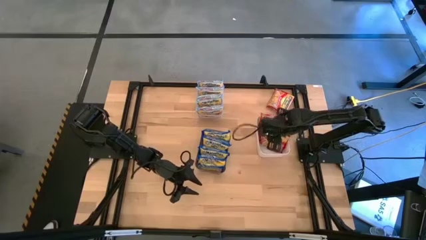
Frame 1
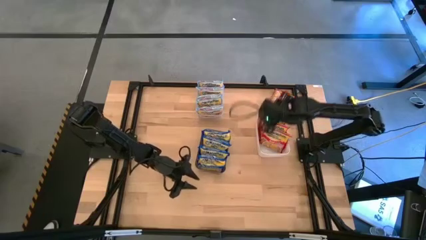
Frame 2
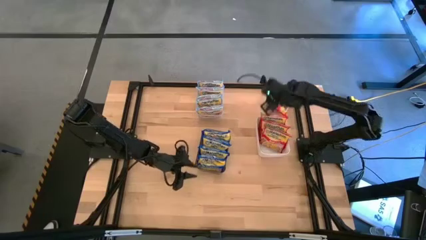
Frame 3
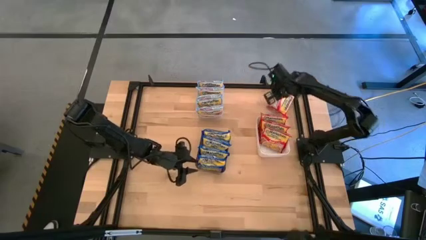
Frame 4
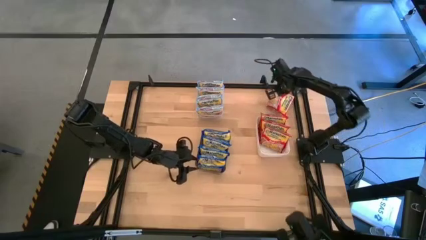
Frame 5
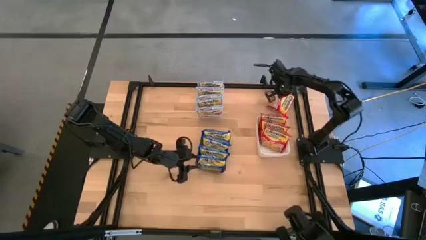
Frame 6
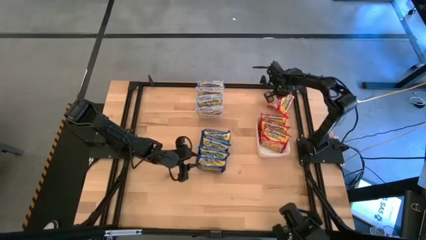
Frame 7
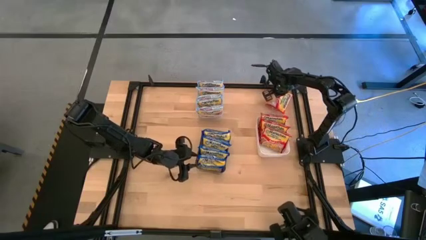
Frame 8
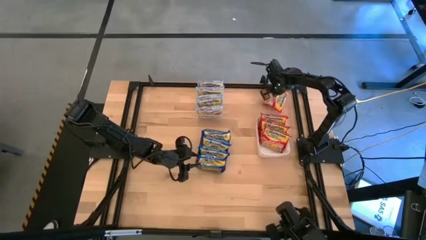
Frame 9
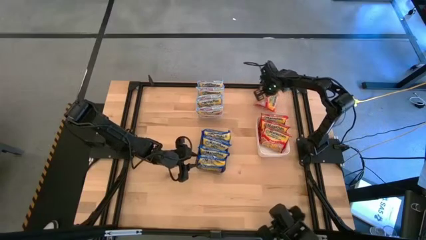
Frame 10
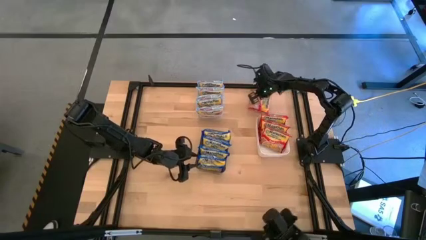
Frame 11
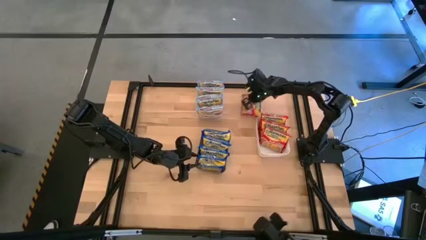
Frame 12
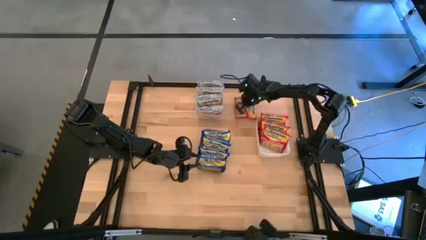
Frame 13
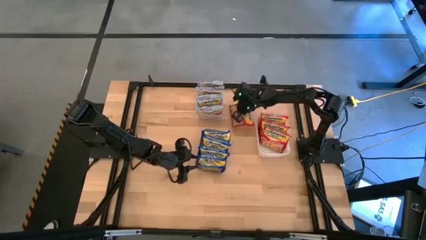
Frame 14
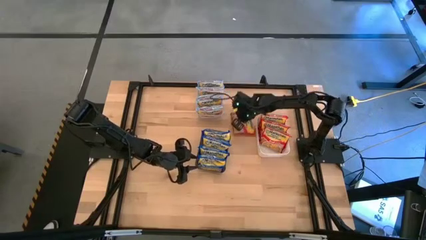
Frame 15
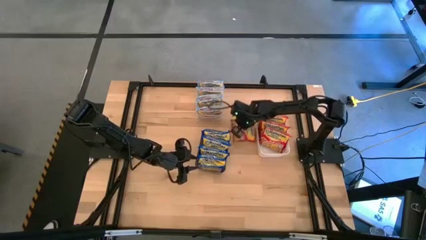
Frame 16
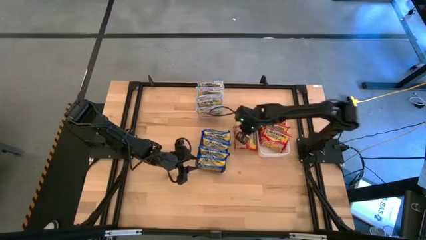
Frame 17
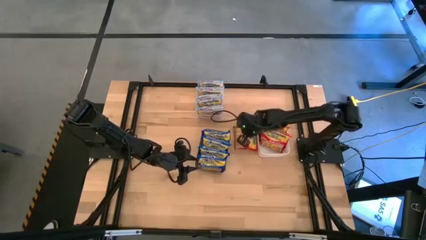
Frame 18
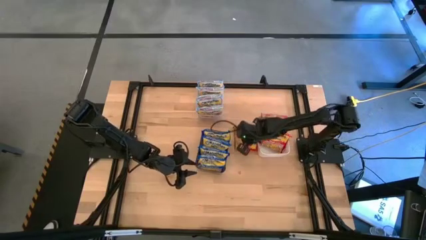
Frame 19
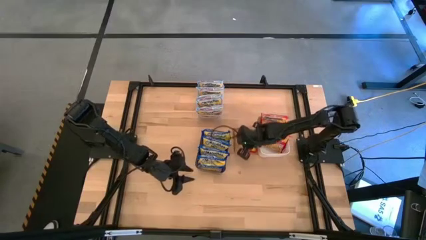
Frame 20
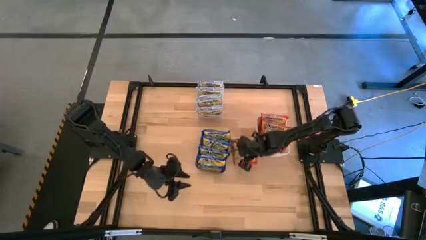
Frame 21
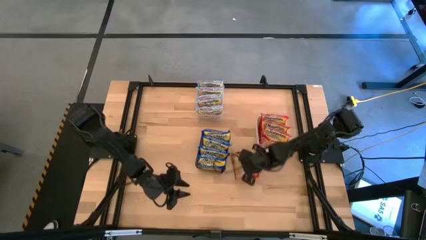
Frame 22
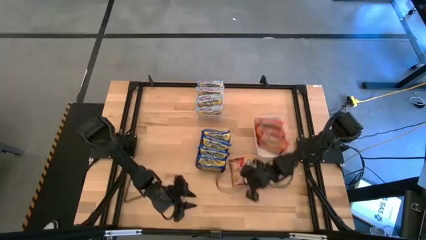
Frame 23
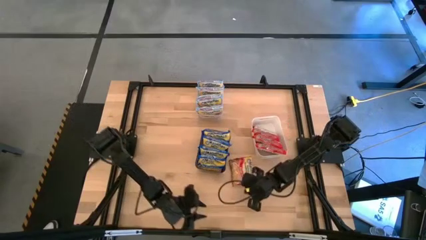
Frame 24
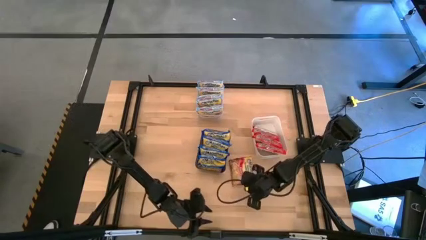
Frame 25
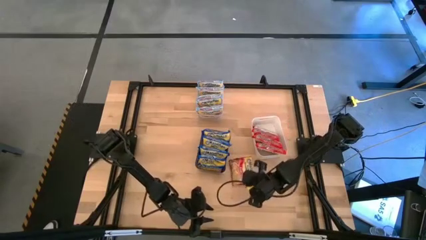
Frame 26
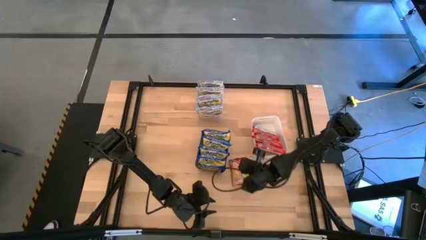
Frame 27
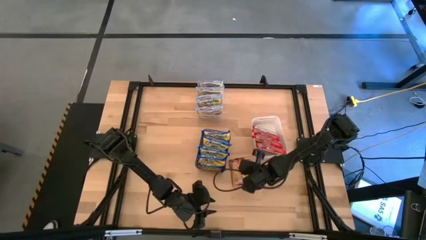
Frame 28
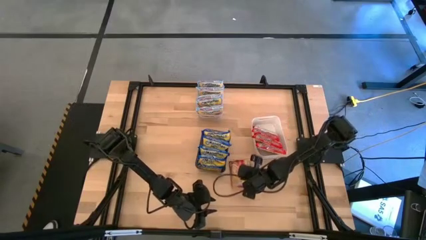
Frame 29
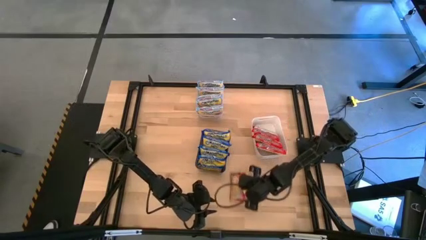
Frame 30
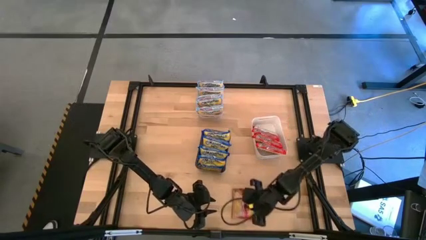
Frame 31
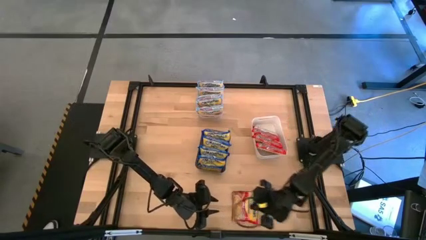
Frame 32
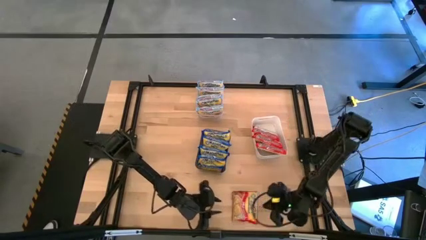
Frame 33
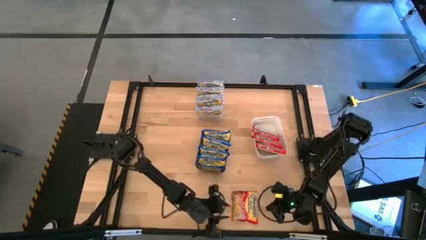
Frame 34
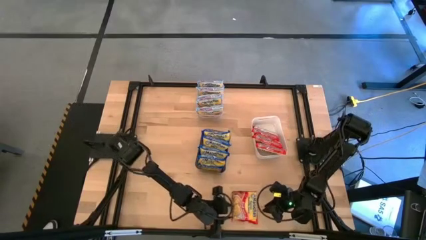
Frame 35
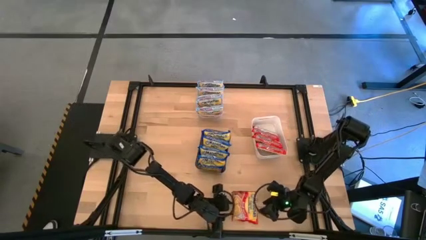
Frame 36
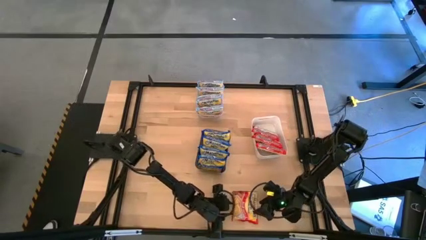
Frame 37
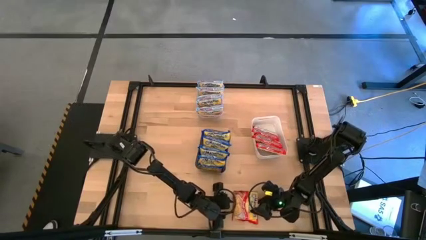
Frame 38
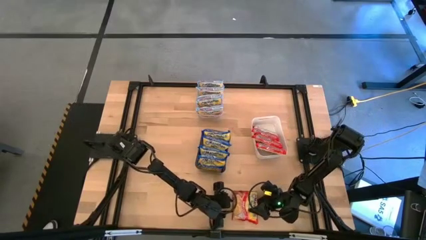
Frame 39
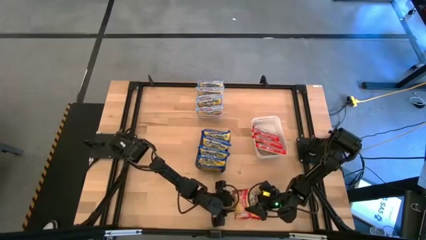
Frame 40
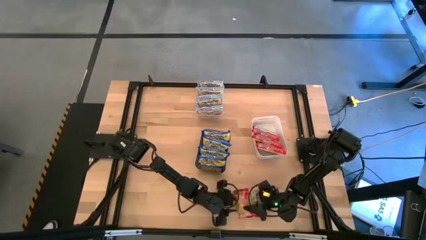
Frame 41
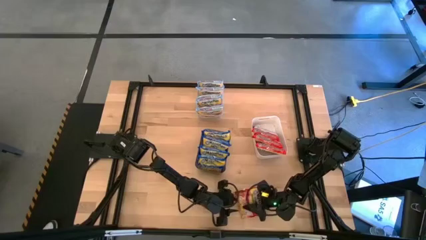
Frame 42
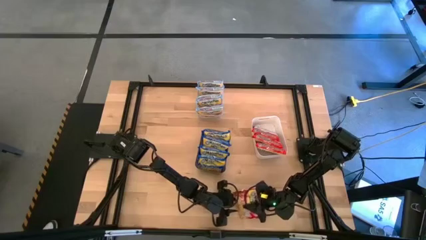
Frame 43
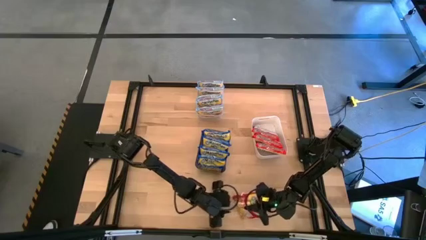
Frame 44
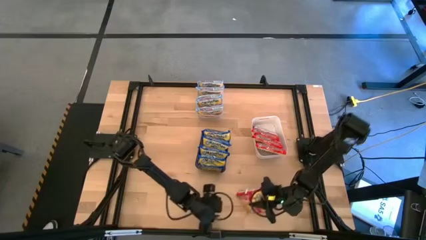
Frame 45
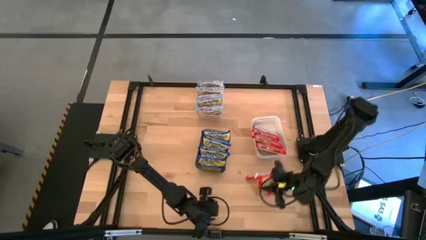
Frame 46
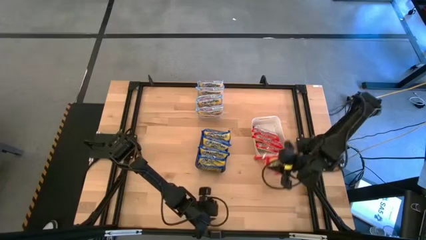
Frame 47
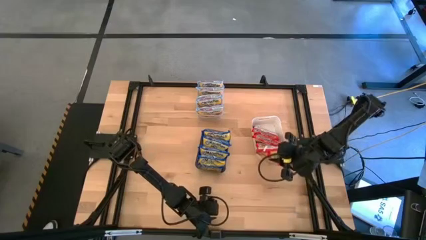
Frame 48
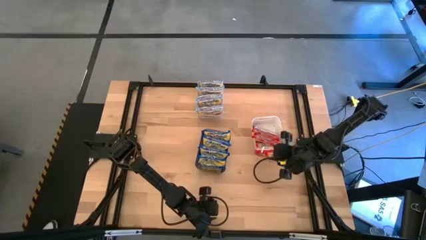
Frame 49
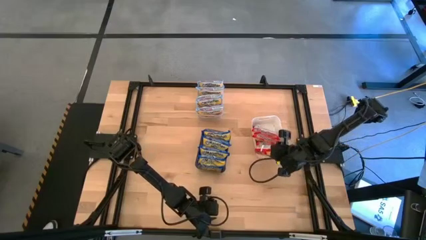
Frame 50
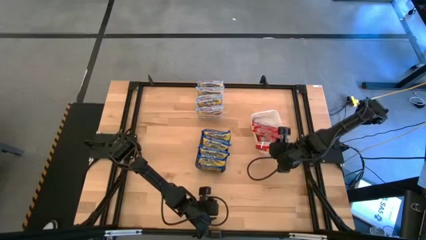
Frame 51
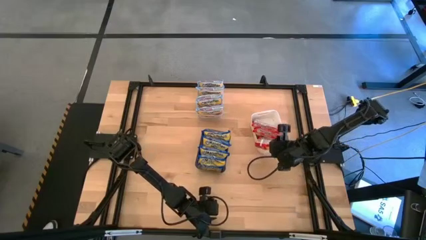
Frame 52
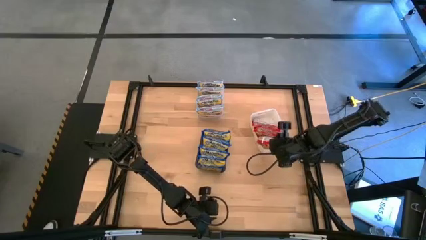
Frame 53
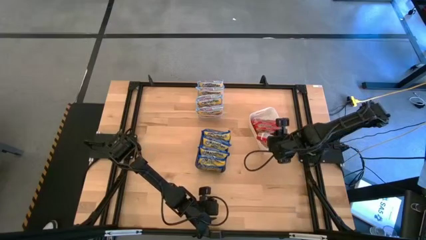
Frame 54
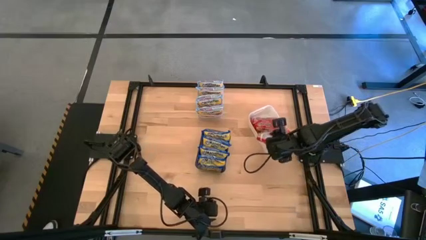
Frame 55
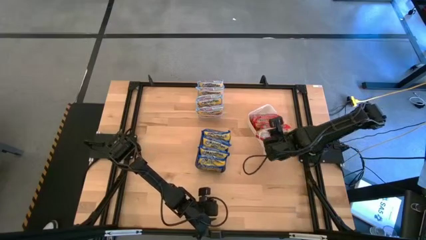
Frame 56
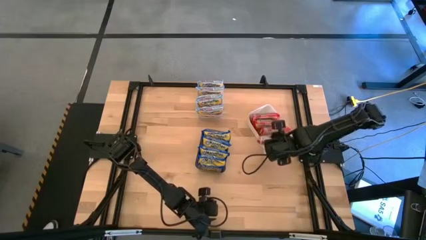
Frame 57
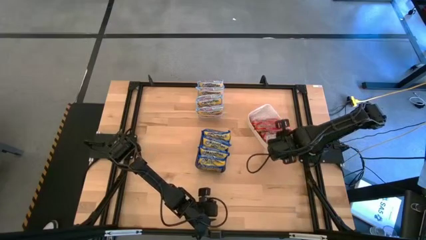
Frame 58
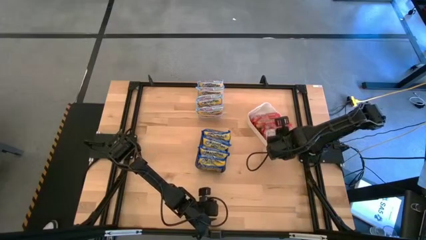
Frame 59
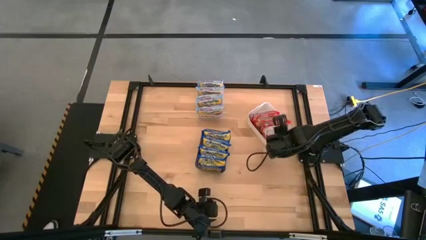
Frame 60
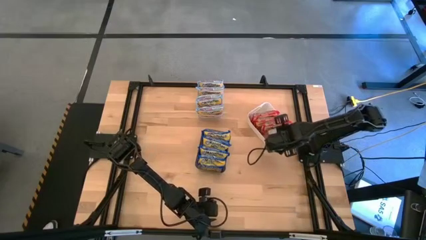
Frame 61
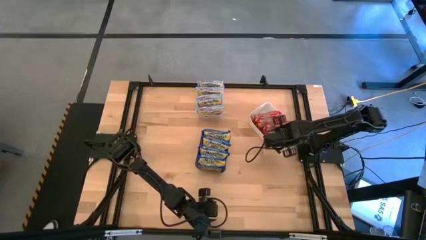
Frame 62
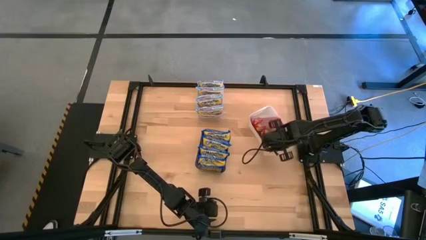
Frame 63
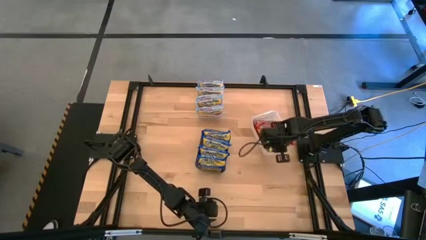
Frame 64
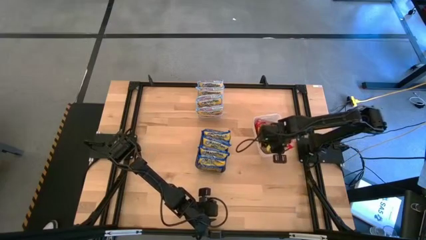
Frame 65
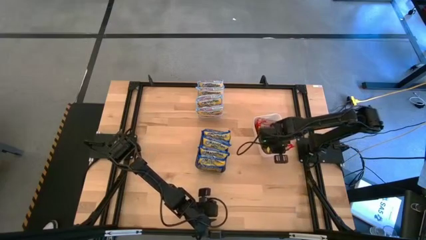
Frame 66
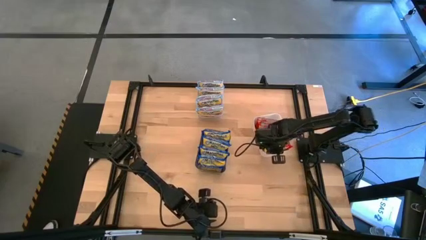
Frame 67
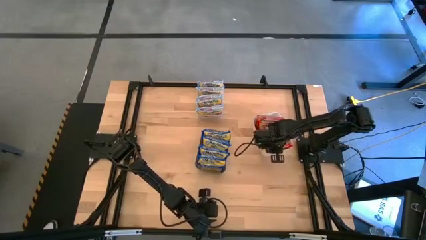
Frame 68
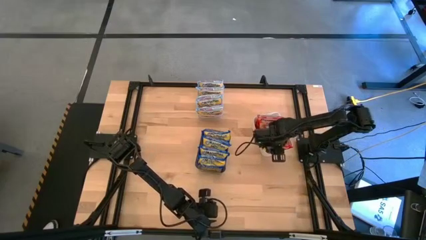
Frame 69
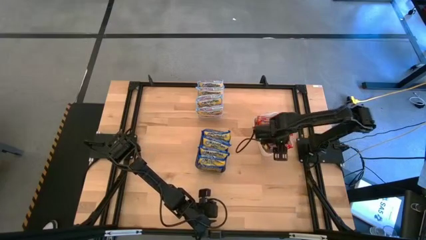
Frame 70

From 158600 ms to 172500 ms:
Task: Sort Maruchan noodles
Put the red noodle pack into the white bin

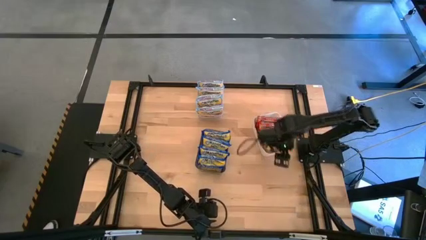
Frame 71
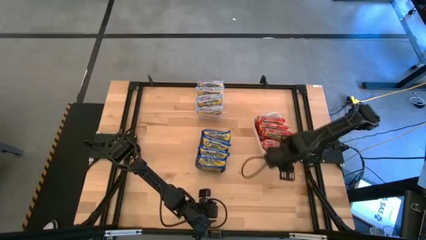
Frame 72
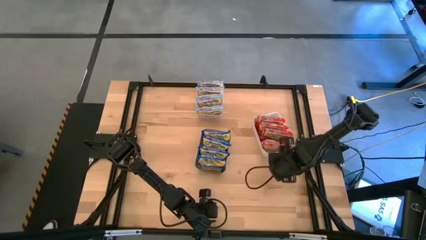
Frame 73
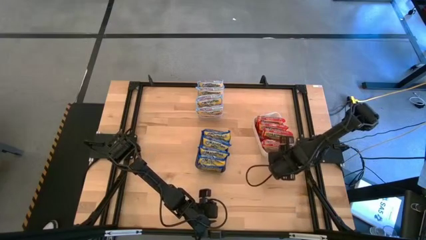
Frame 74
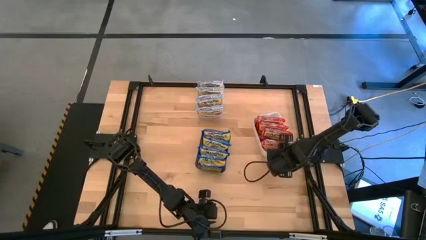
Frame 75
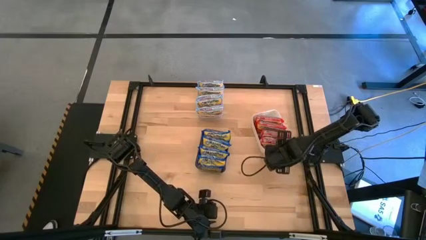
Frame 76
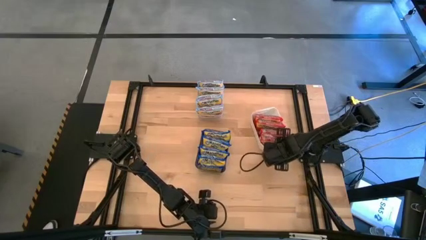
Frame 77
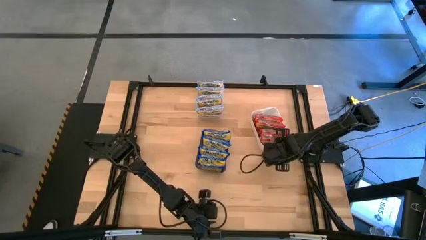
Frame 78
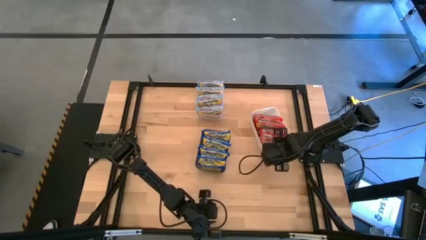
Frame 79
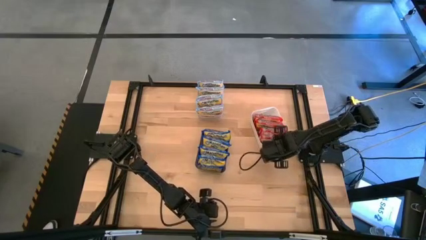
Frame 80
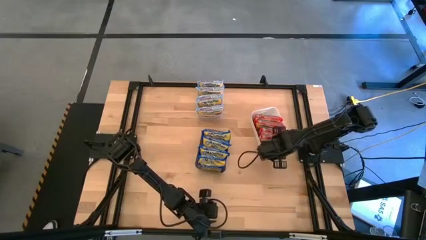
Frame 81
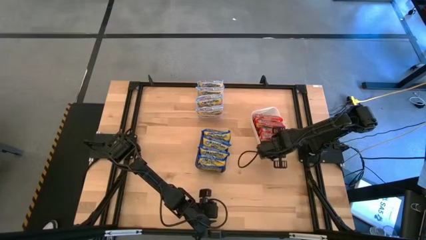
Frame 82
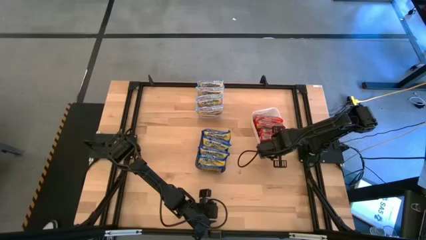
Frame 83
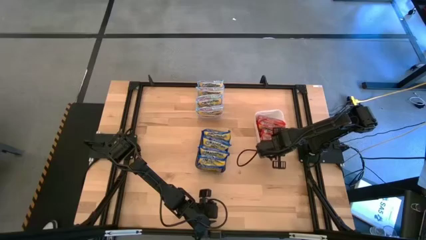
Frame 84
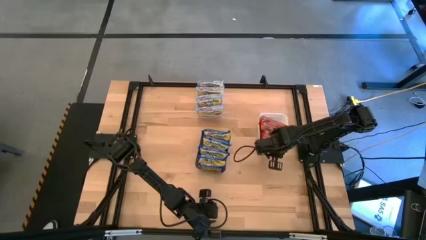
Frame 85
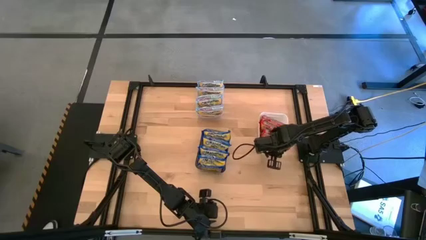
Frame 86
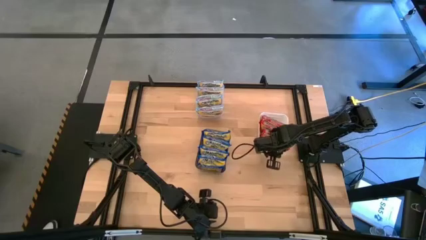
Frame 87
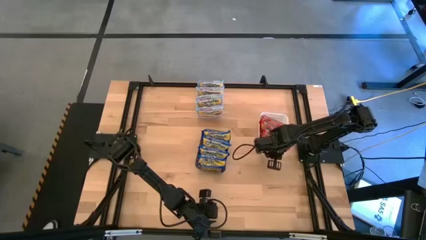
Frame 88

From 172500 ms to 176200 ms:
Adjust the white bin
